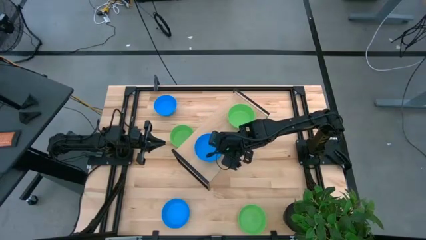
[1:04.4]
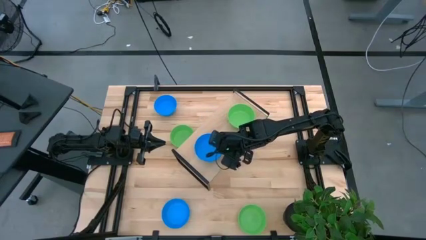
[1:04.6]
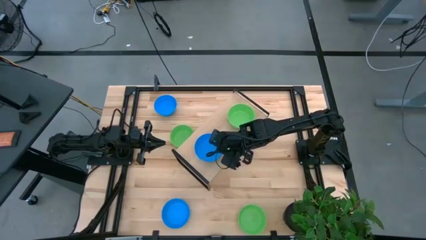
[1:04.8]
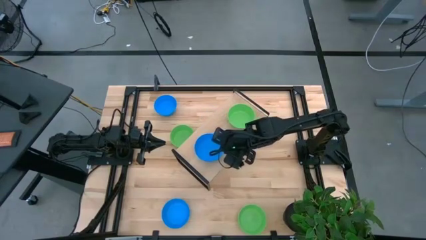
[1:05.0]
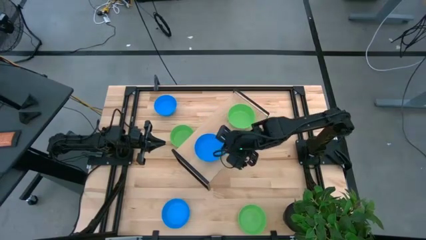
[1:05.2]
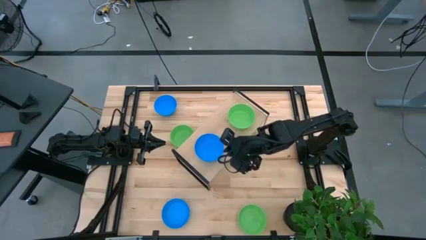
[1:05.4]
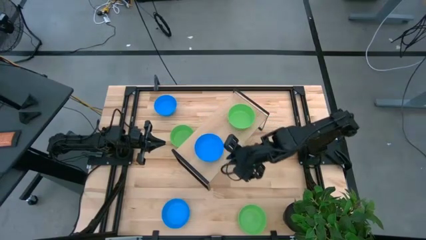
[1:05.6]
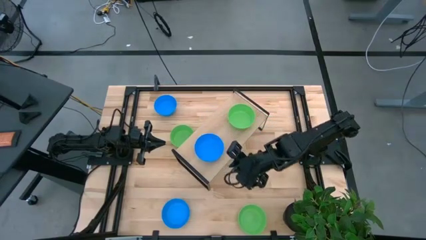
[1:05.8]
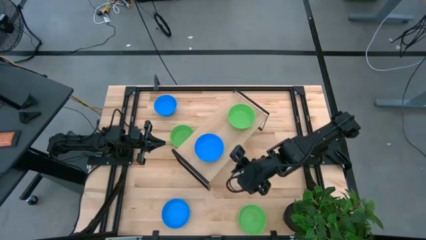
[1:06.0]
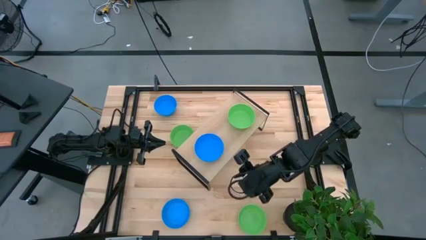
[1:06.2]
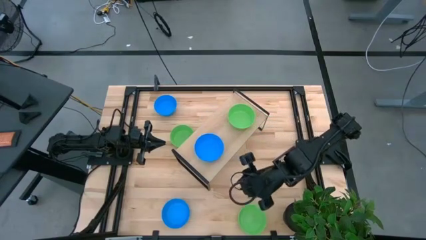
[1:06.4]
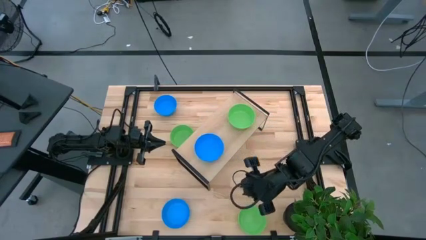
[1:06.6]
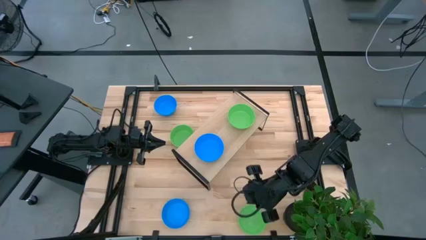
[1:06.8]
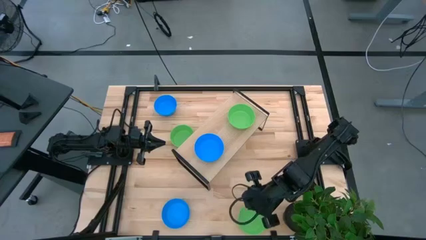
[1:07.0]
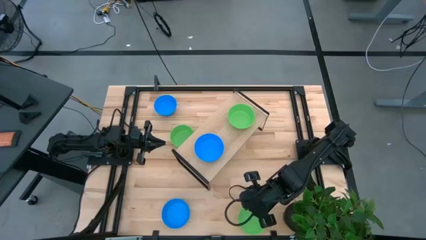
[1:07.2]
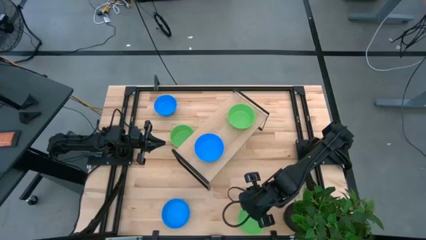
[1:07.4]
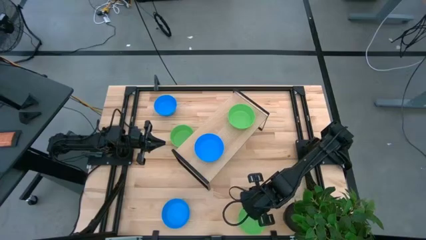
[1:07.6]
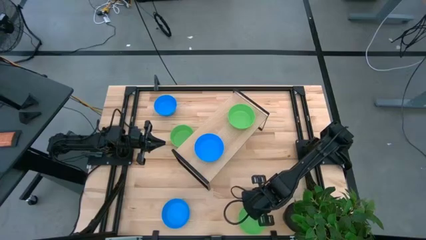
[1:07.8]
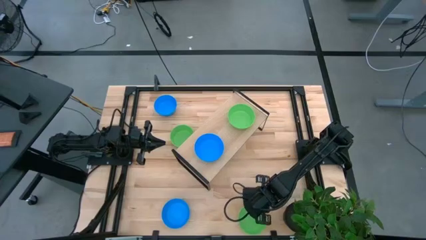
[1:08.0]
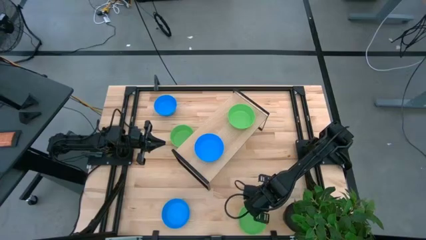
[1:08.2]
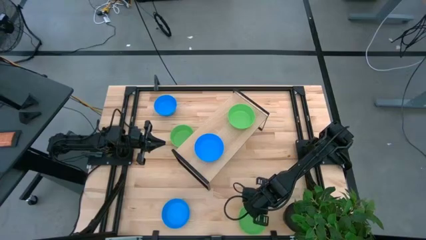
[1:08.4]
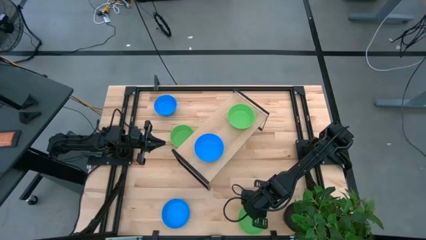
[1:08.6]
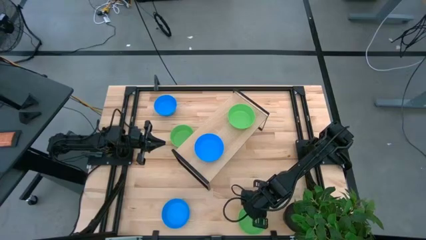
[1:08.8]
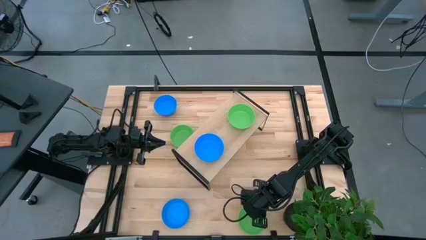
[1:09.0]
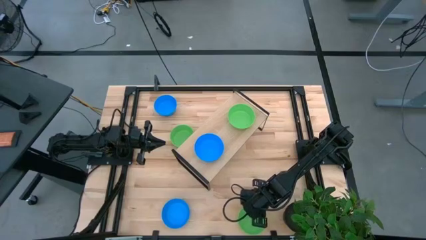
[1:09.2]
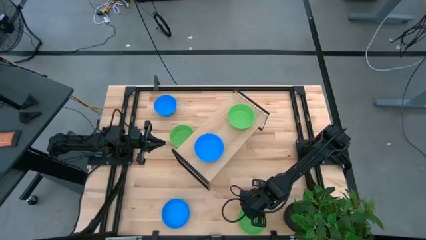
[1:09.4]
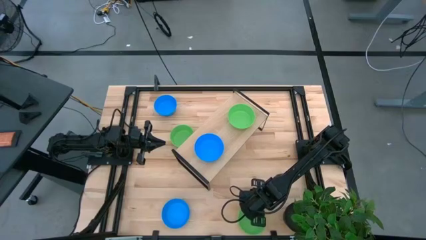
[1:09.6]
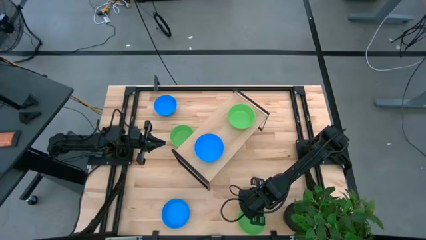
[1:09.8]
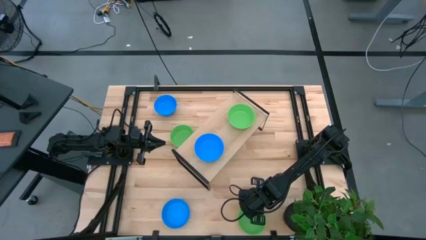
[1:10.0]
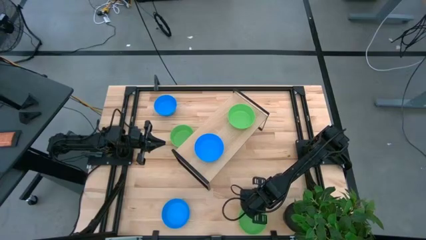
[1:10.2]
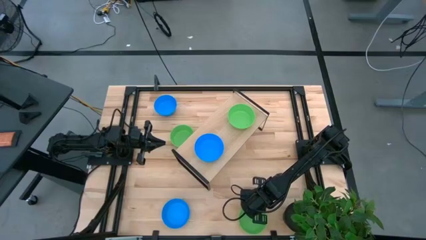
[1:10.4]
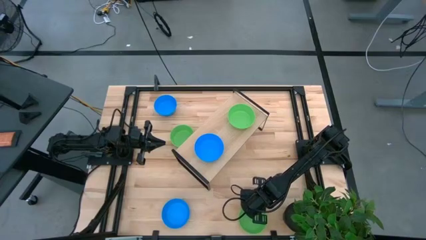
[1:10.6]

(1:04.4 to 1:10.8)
Task: Pick & Place Mini bowls
Stack the bottom green bowl on top of the green bowl on the shelf

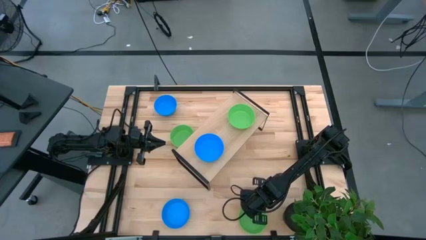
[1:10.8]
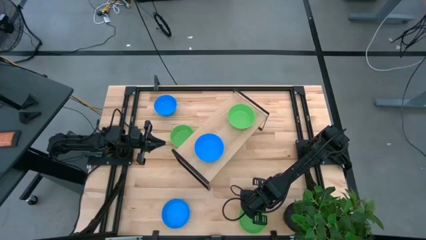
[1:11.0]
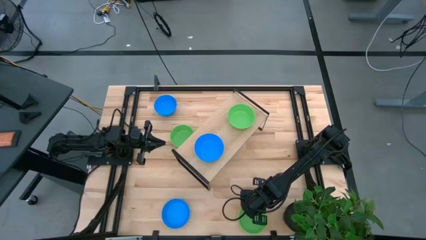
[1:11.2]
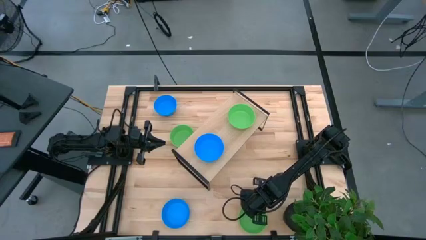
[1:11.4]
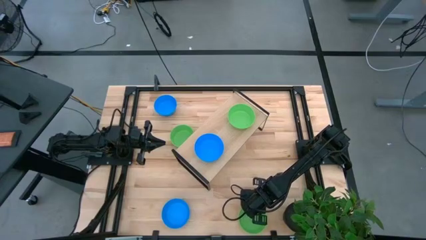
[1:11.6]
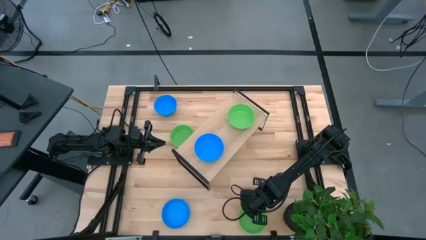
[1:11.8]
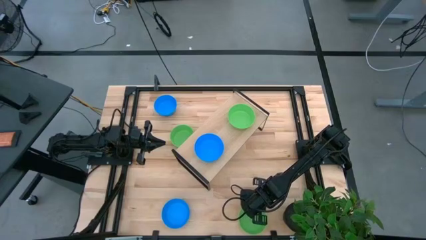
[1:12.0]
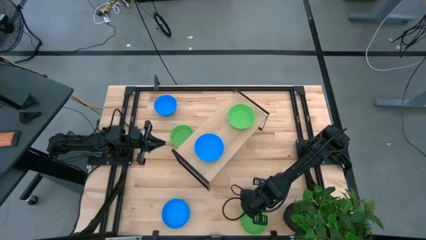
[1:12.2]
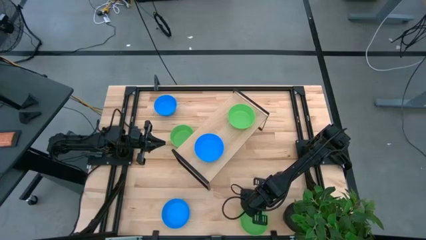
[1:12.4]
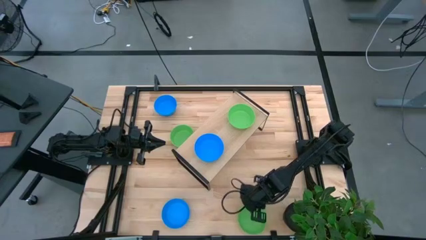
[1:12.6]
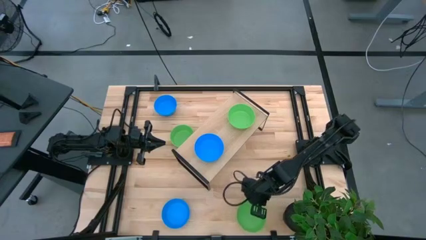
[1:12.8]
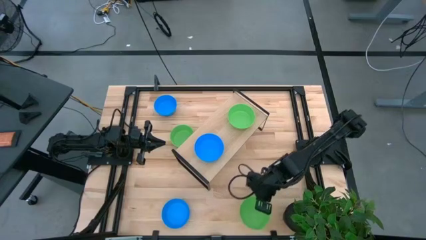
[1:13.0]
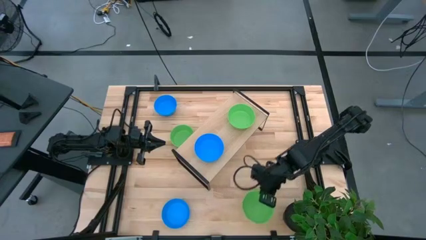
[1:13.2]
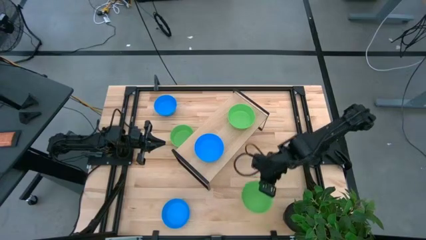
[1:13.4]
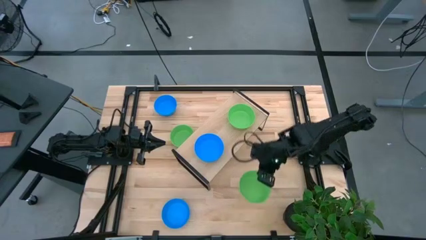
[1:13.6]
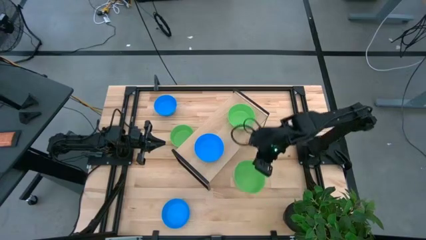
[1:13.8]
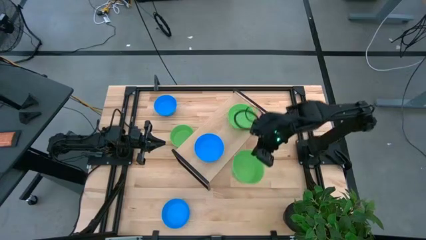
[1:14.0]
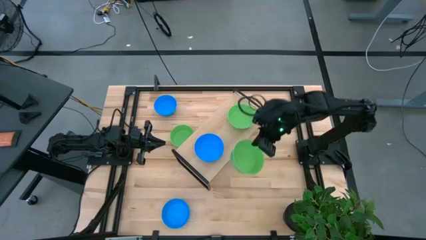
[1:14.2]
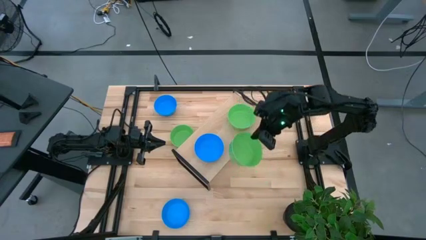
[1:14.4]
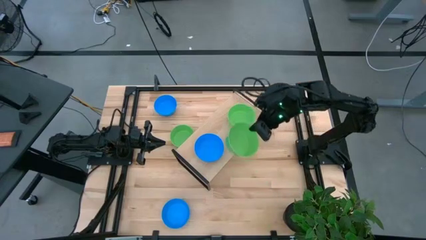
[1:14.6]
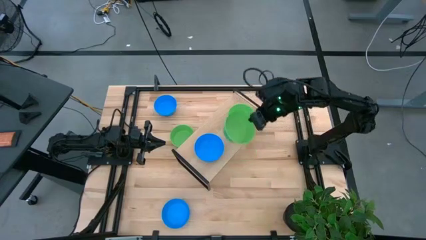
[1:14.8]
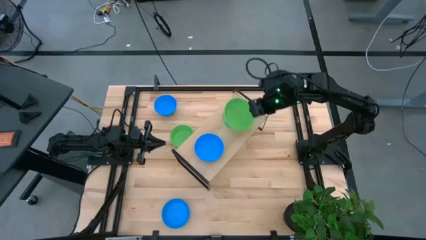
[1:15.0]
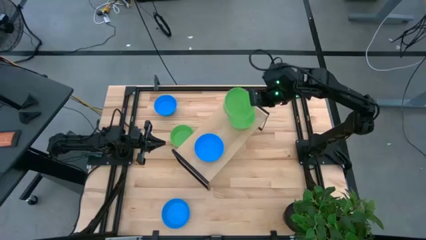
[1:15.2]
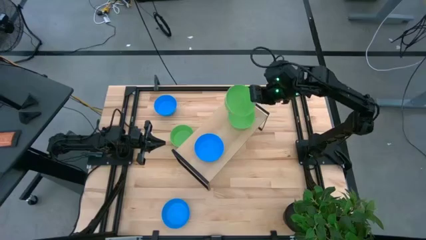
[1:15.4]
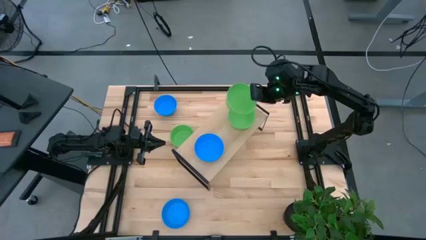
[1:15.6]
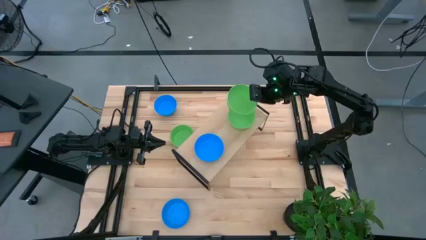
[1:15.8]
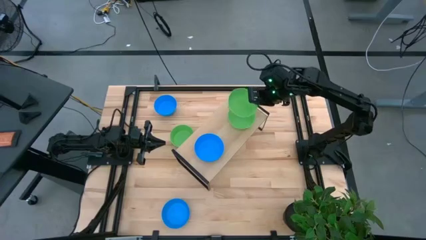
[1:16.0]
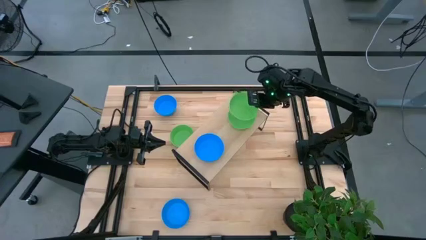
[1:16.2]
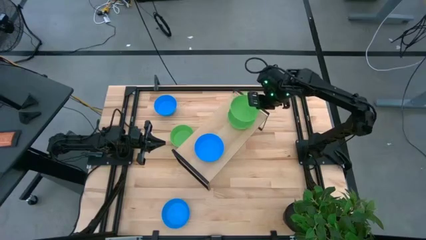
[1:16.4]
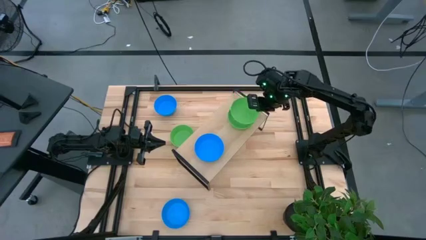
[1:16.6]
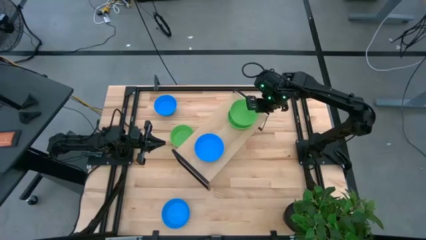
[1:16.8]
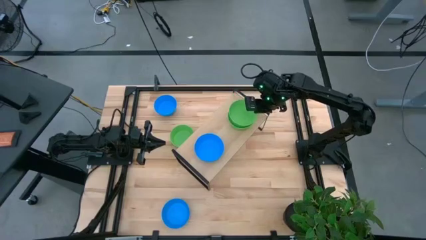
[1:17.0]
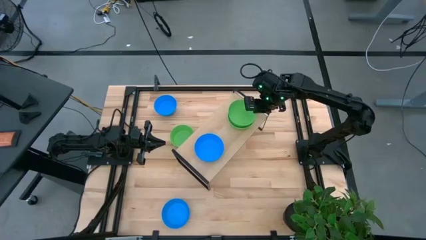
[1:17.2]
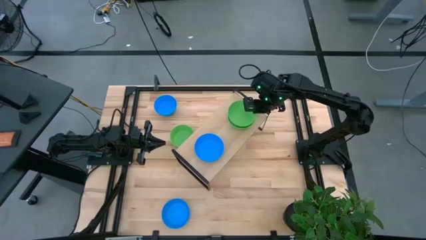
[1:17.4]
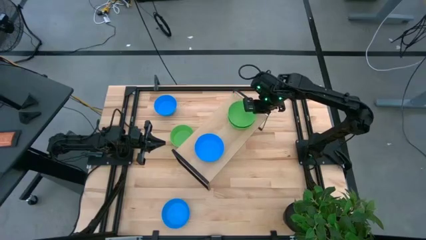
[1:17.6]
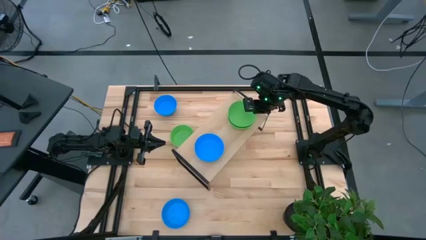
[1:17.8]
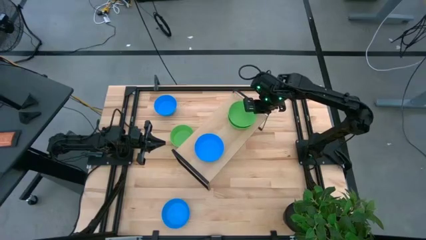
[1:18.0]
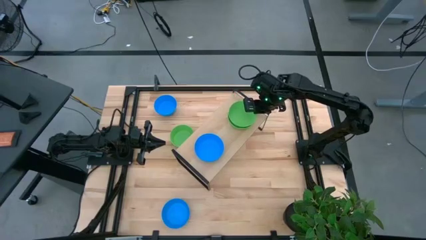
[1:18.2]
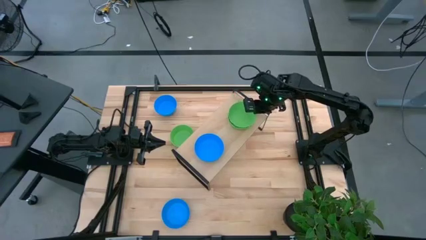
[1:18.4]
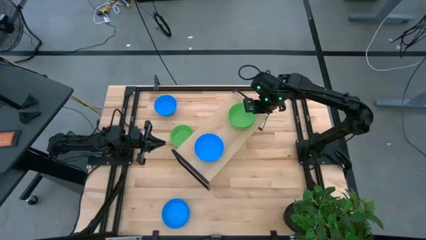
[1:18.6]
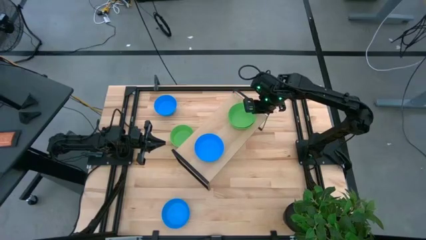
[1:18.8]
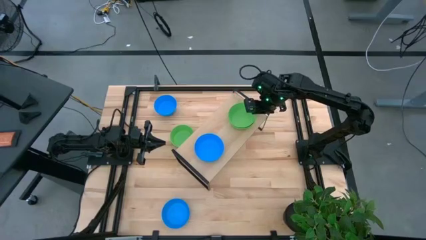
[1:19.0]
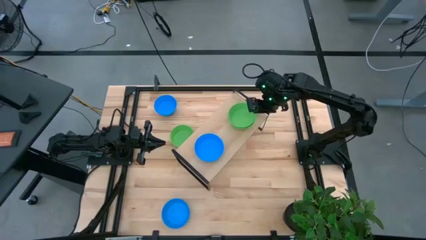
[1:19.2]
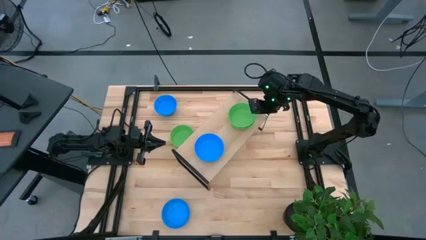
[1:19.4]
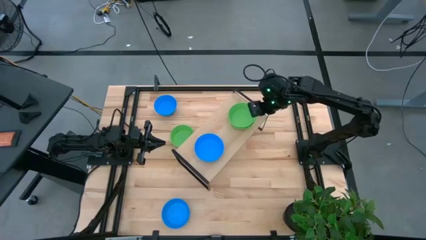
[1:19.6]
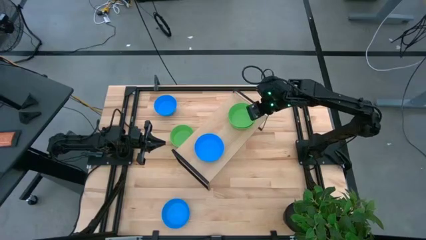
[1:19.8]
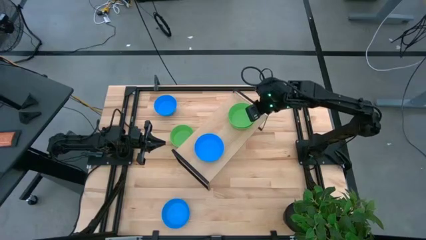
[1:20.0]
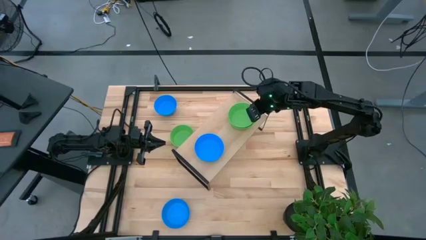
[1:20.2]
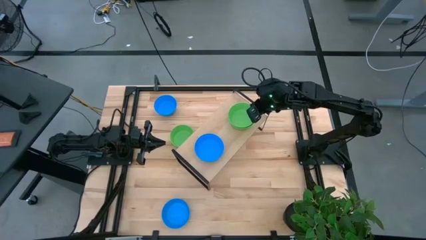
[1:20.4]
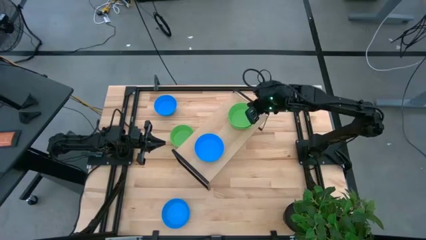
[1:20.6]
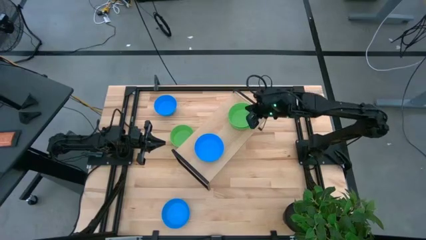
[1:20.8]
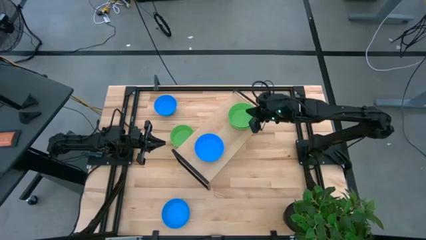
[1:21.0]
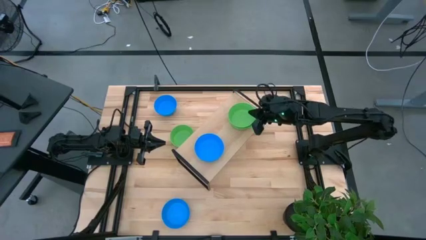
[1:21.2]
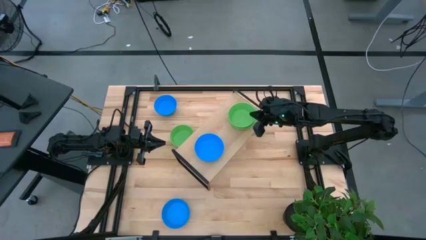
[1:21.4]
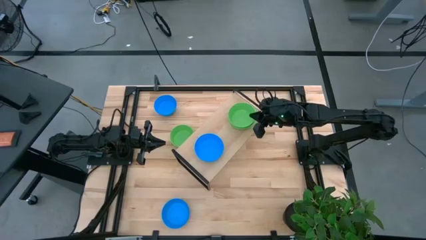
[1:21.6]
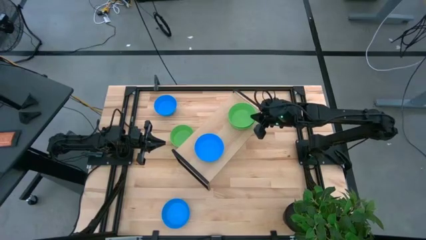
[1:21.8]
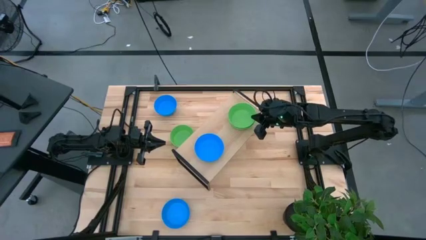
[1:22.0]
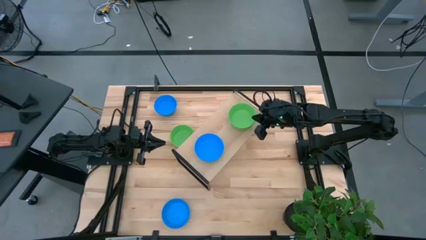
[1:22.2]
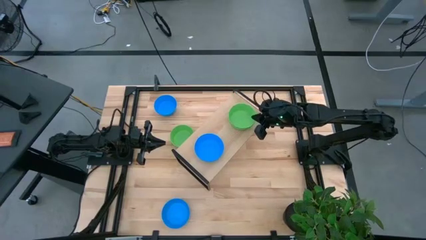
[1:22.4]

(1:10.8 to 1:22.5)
Stack the bottom green bowl on top of the green bowl on the shelf
